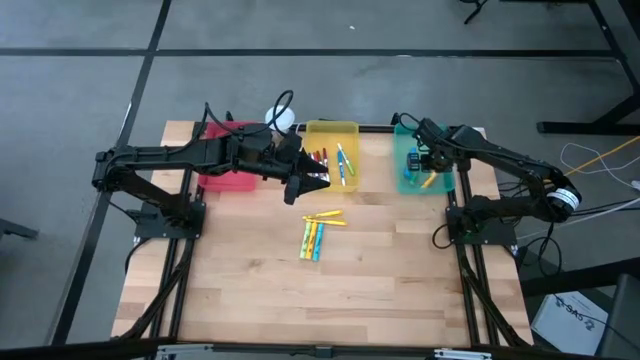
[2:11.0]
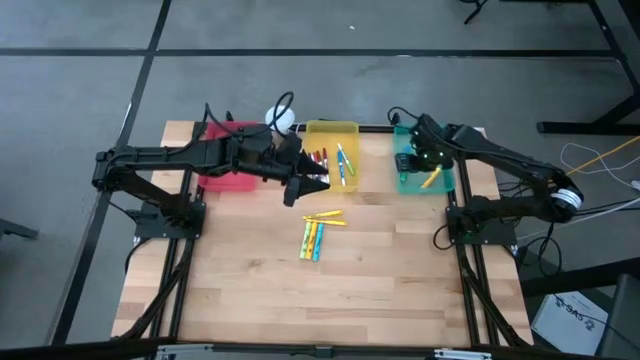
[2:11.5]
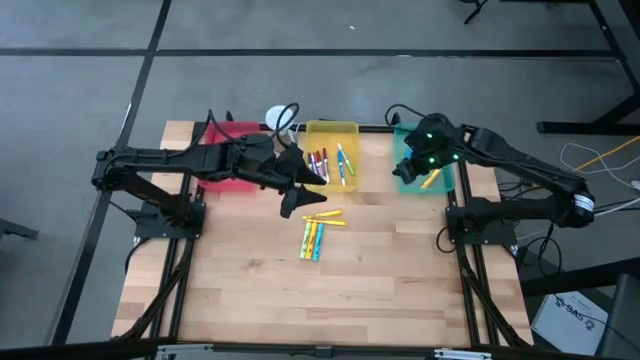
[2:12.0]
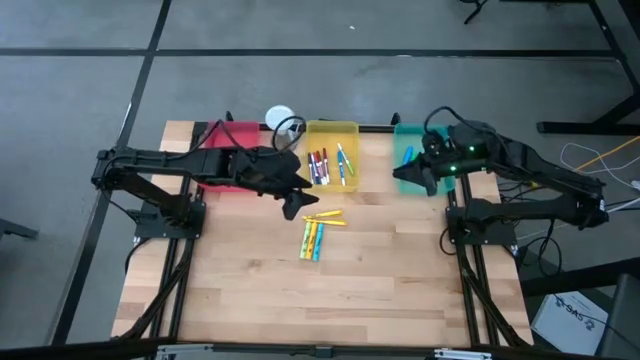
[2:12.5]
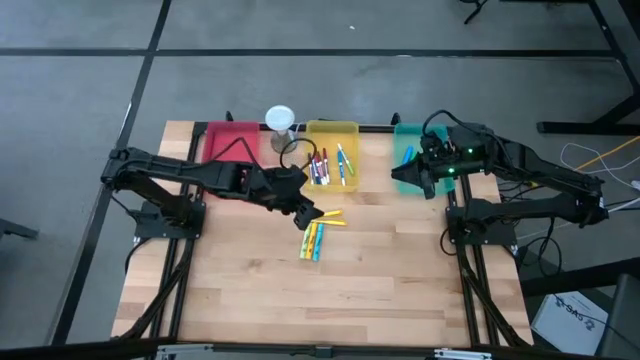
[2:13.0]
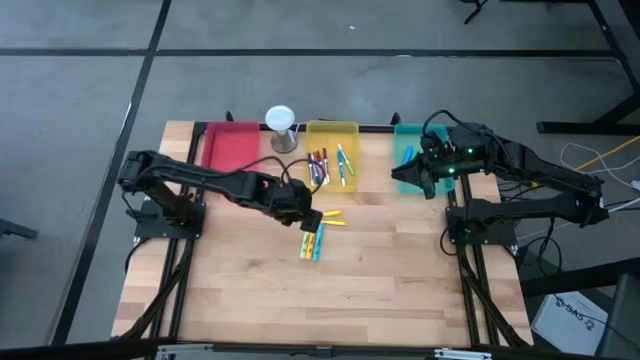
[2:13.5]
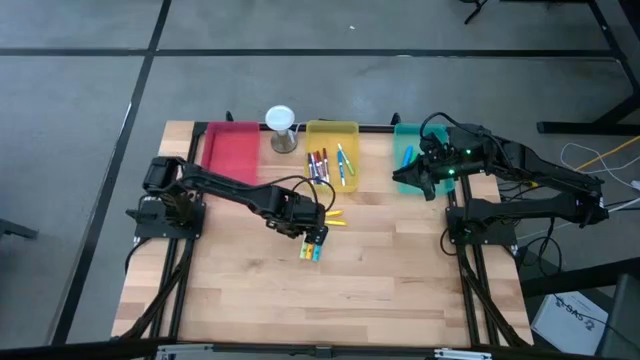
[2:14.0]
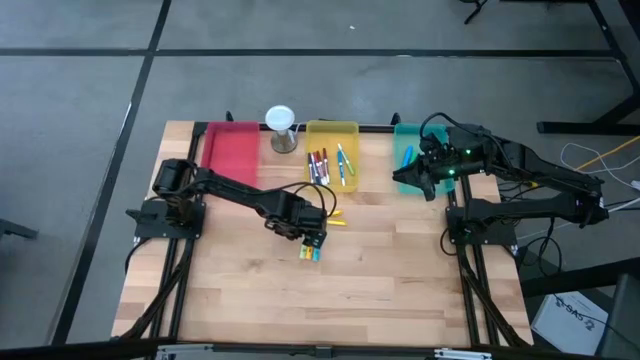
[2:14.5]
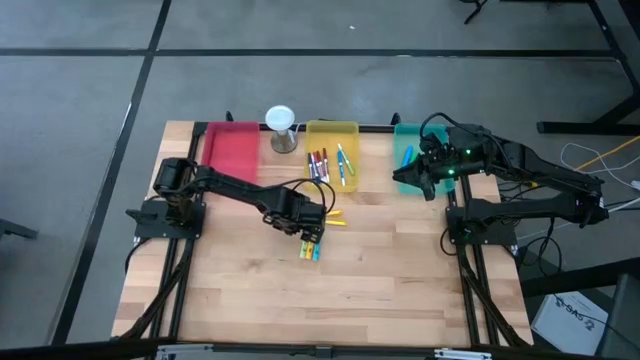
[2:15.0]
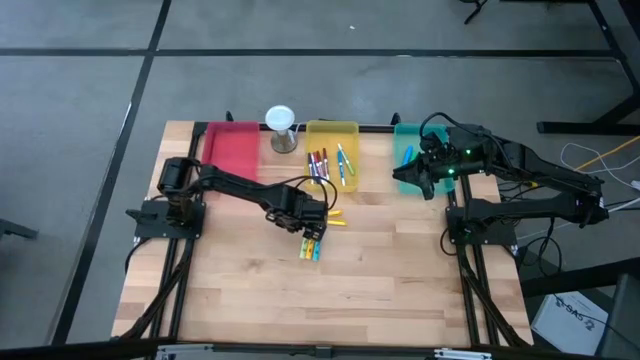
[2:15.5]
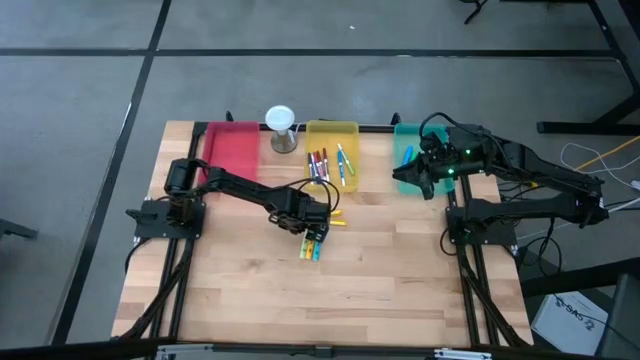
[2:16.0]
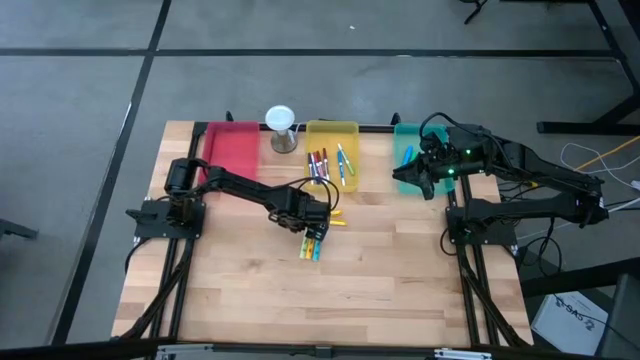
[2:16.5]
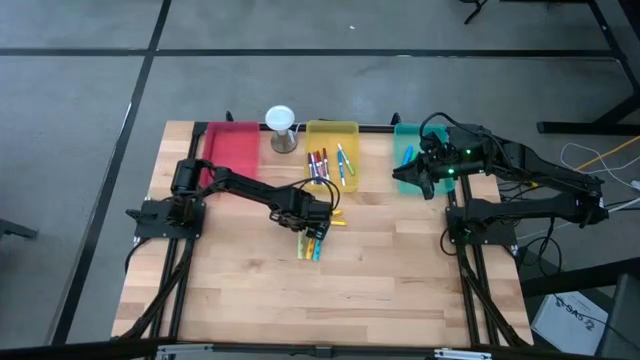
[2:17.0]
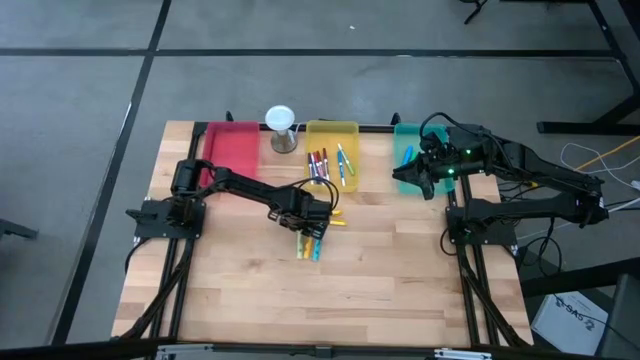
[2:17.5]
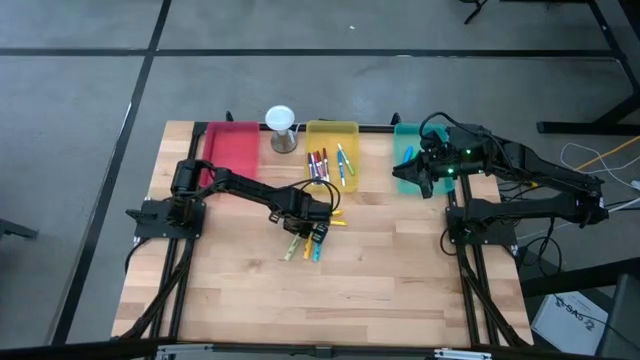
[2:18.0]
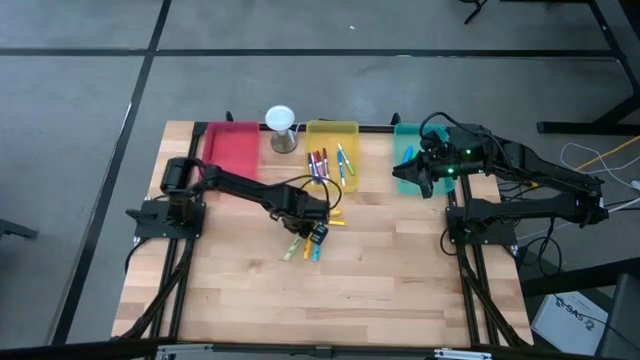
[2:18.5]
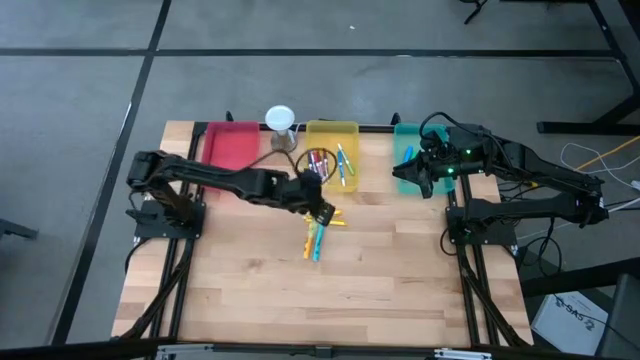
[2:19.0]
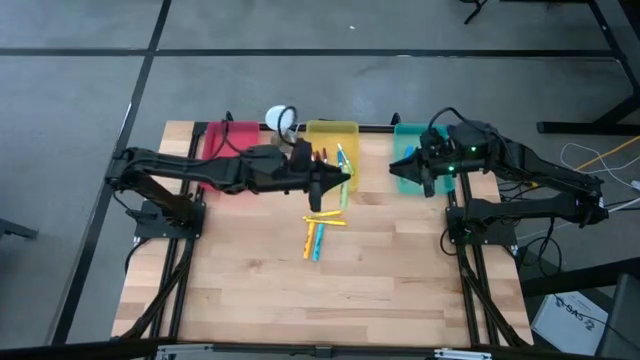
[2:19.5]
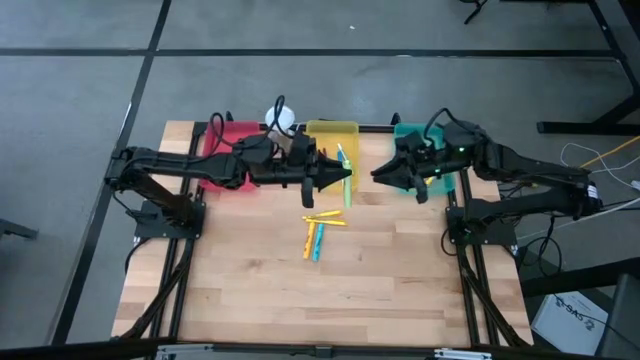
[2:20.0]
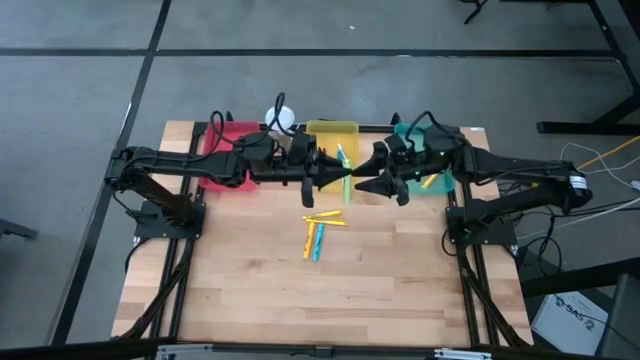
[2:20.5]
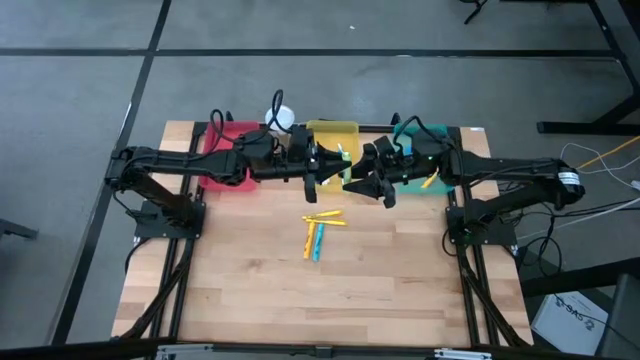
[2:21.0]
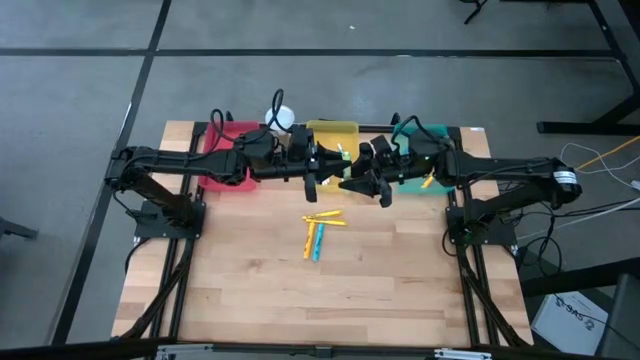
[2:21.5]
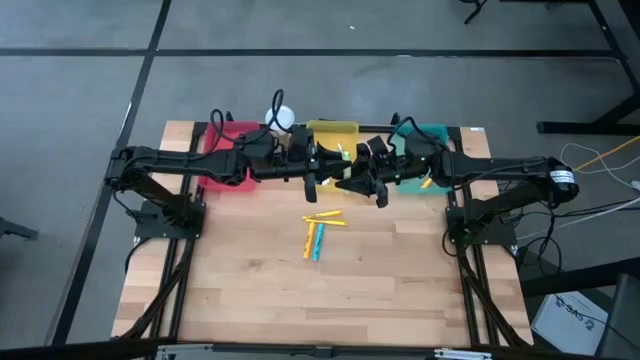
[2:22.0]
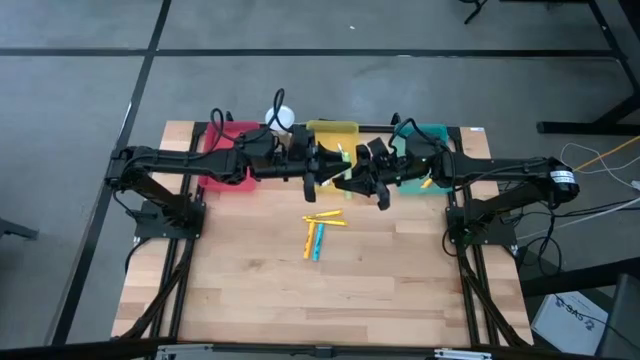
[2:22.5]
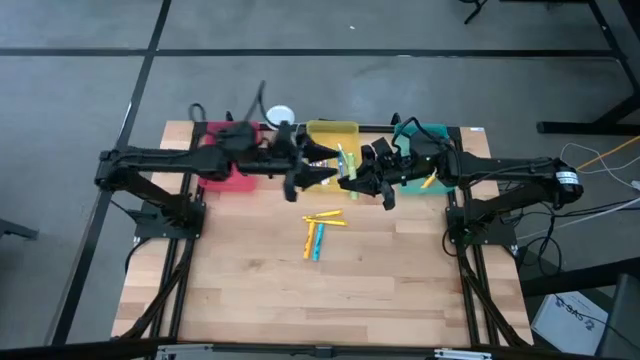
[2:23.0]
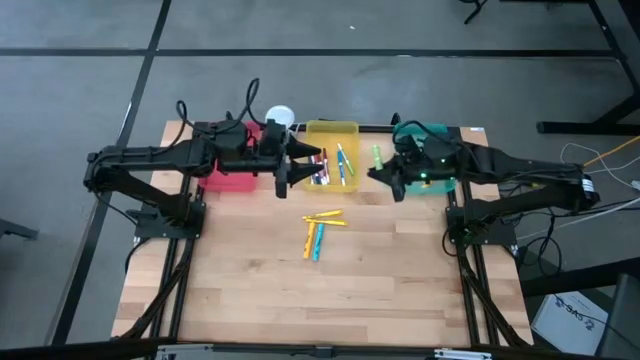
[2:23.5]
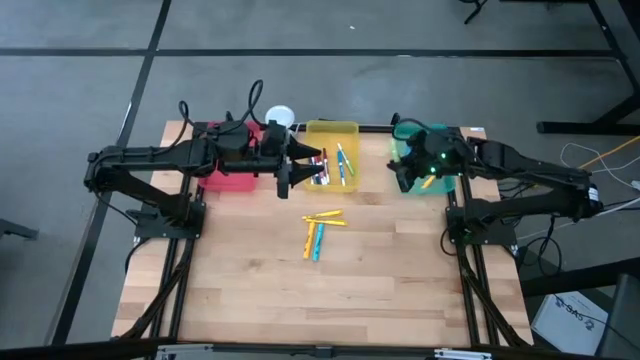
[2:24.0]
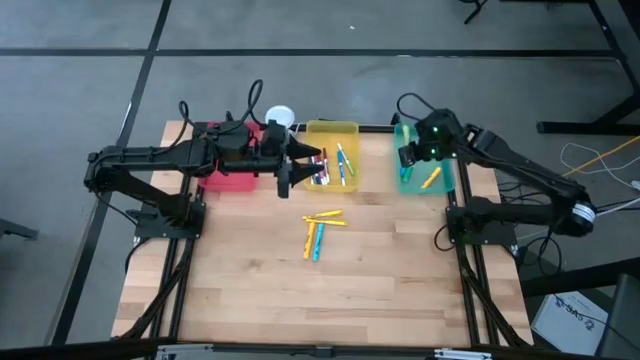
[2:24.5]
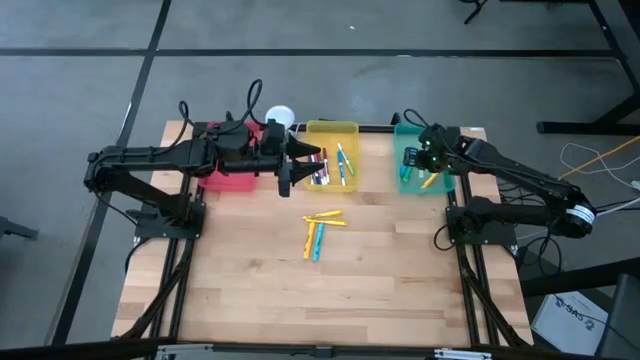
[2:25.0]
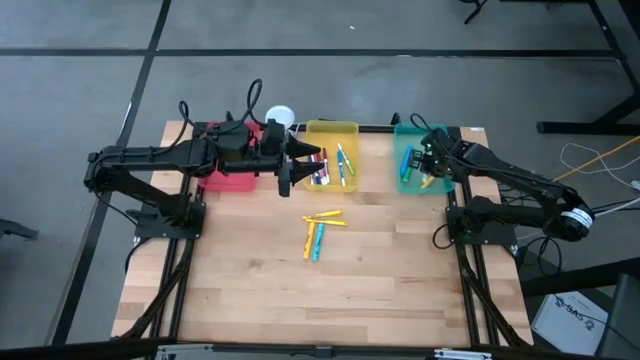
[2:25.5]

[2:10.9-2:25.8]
Task: Pick & Place Markers
Put the light green highlighter into the blue bin

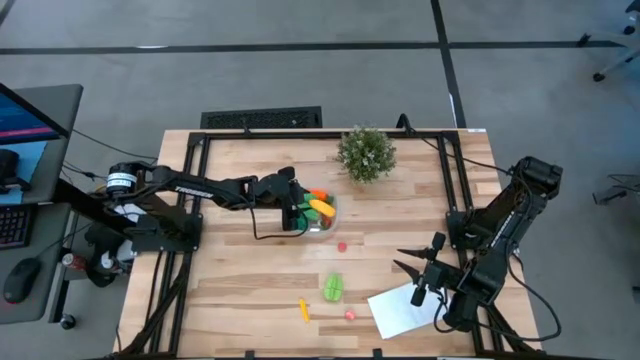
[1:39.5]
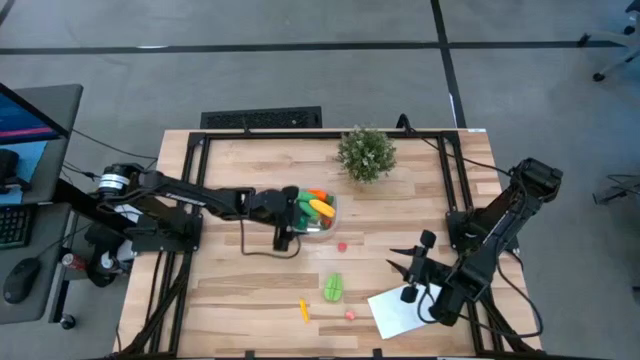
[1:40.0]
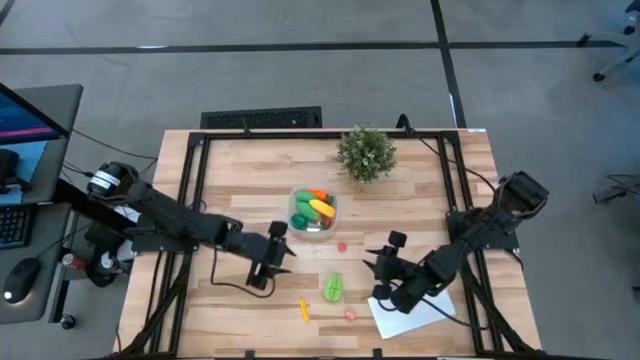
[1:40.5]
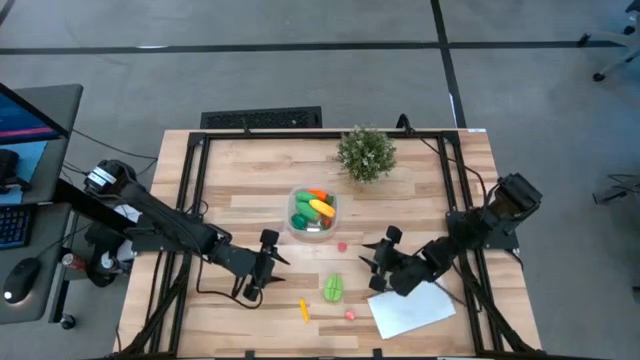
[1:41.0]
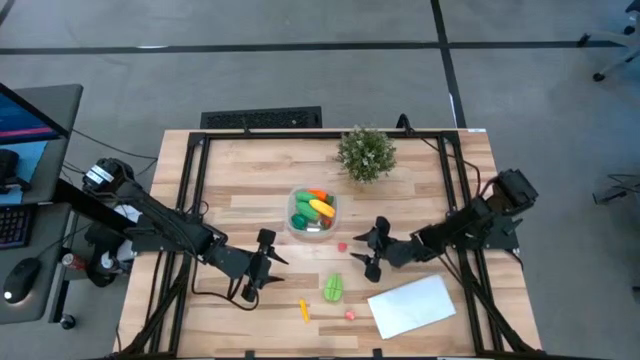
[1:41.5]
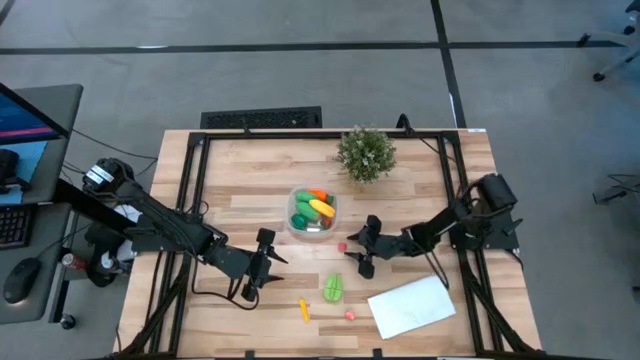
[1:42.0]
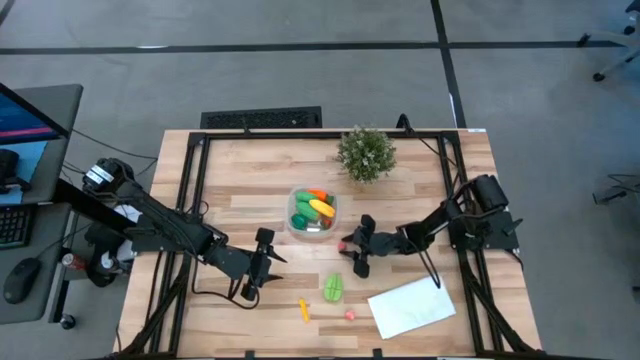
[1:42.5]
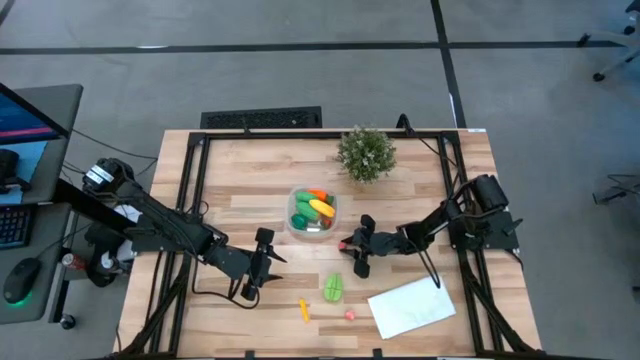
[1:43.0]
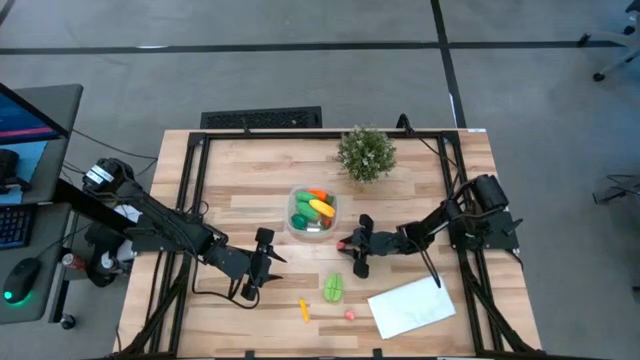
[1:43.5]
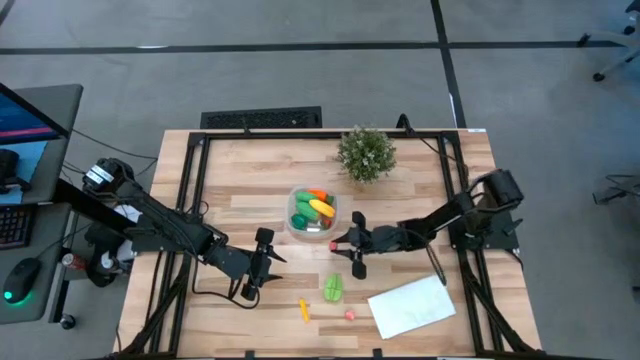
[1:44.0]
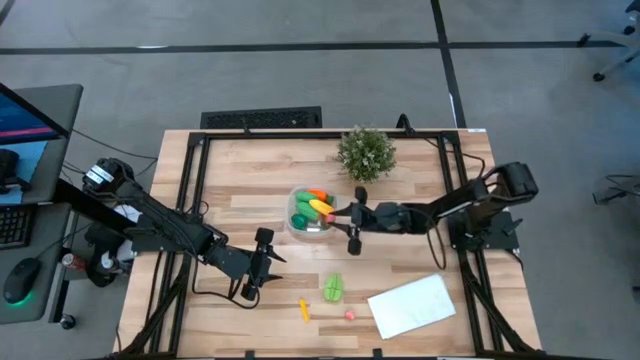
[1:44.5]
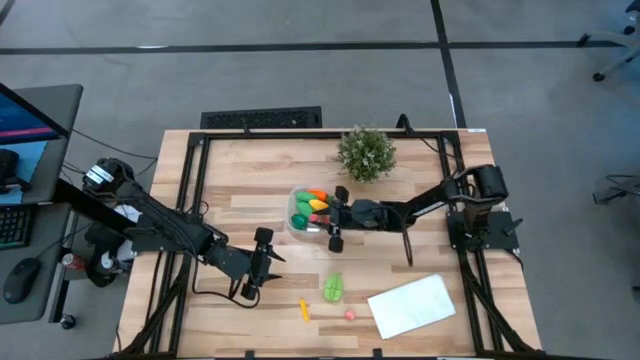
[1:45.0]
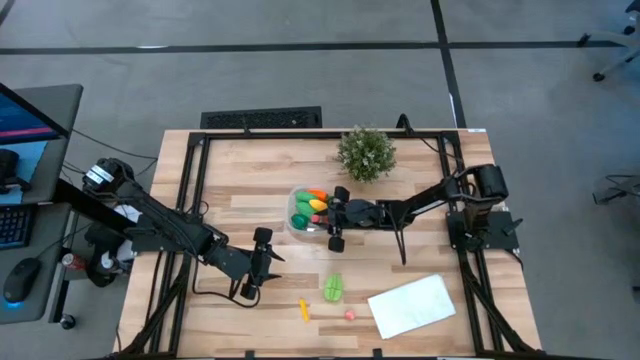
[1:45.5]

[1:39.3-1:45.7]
Task: Pick and placing Produce into tupperware
Put the top pink peach into the transparent container
